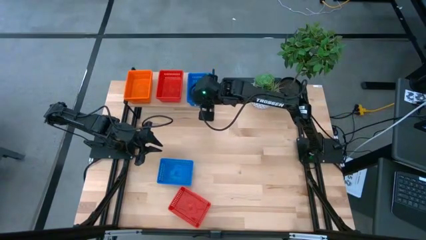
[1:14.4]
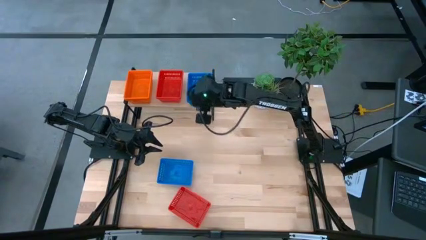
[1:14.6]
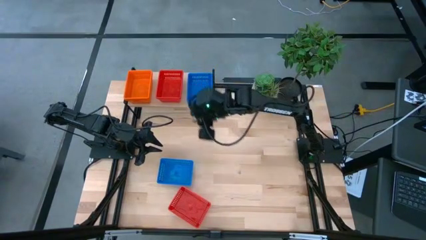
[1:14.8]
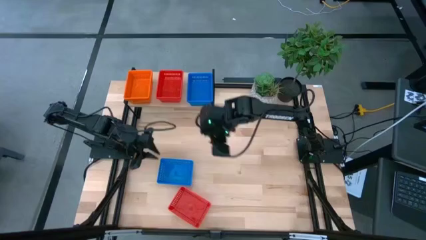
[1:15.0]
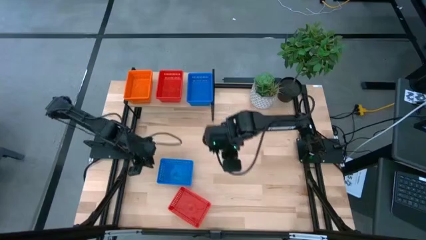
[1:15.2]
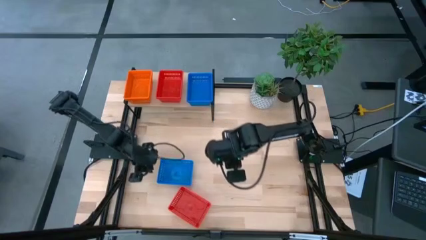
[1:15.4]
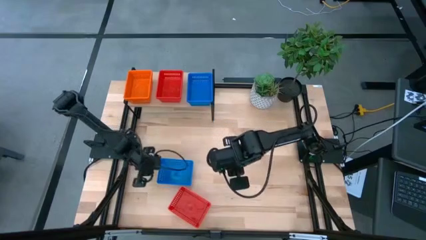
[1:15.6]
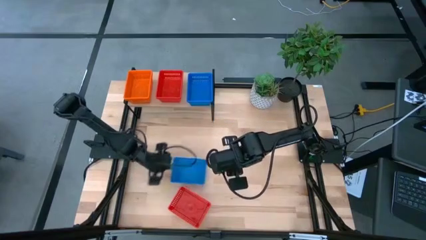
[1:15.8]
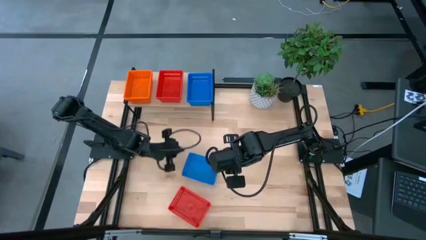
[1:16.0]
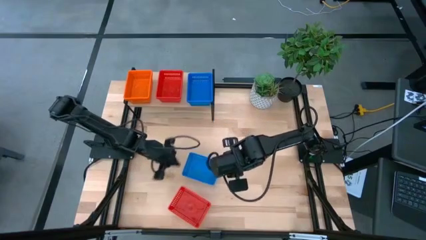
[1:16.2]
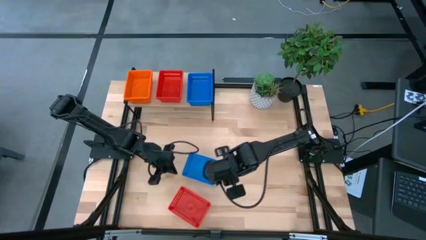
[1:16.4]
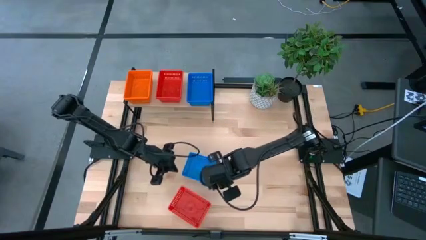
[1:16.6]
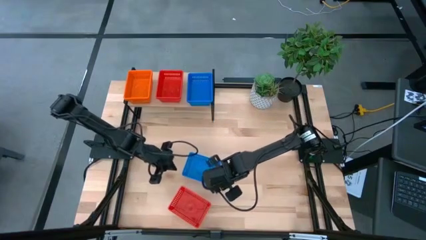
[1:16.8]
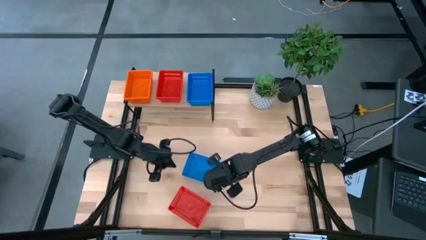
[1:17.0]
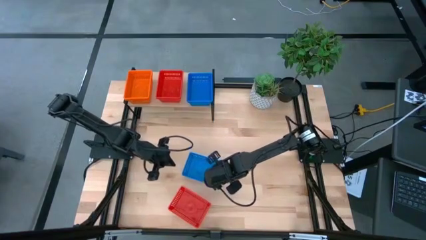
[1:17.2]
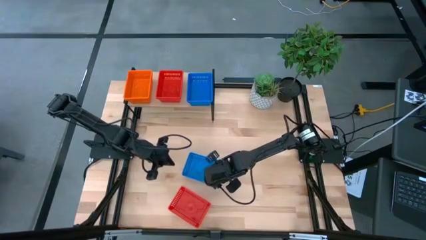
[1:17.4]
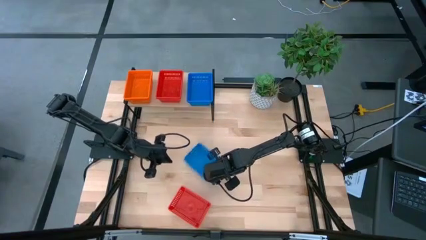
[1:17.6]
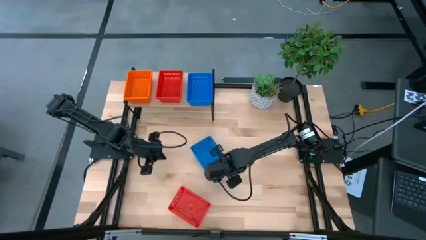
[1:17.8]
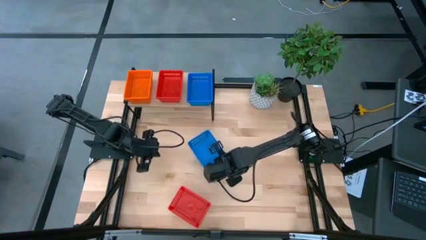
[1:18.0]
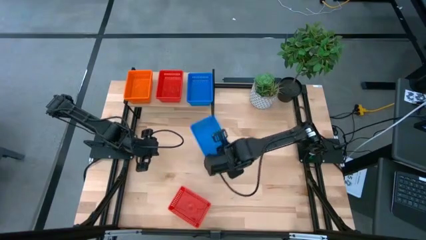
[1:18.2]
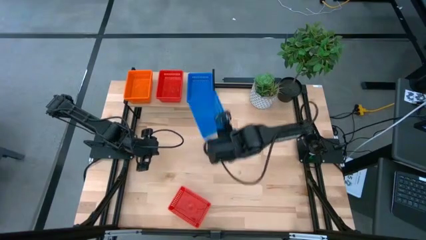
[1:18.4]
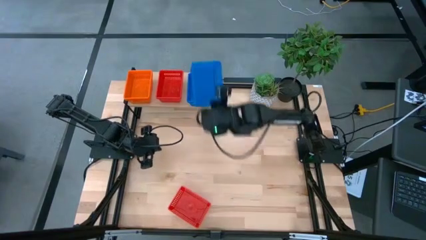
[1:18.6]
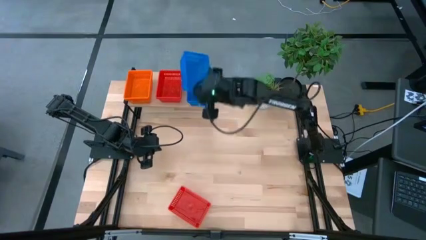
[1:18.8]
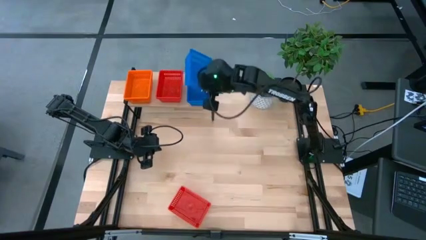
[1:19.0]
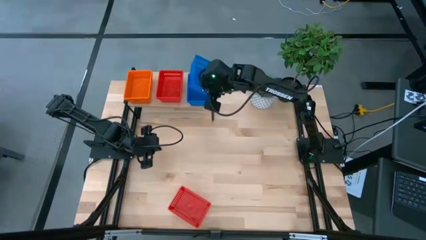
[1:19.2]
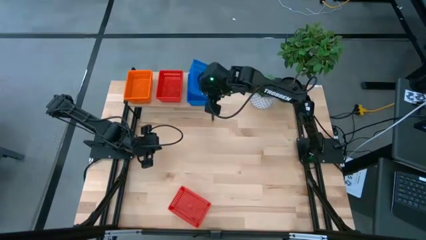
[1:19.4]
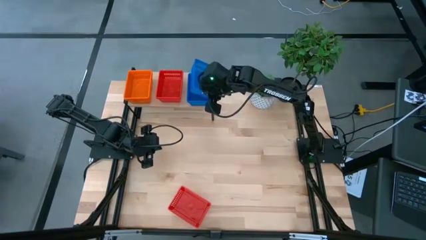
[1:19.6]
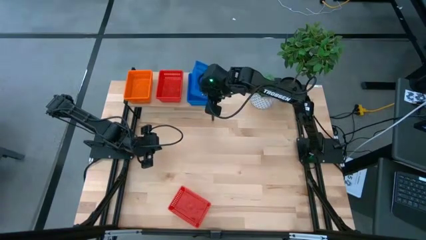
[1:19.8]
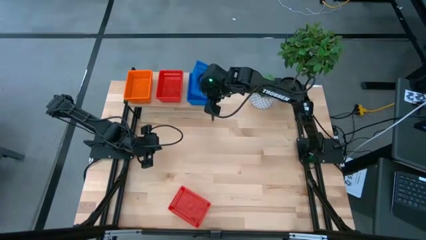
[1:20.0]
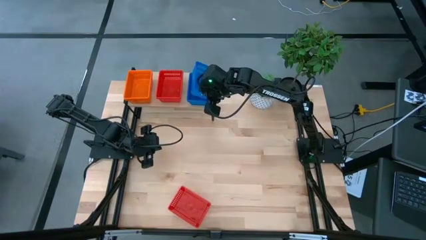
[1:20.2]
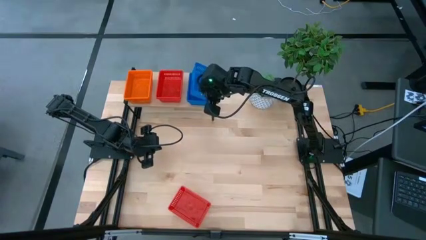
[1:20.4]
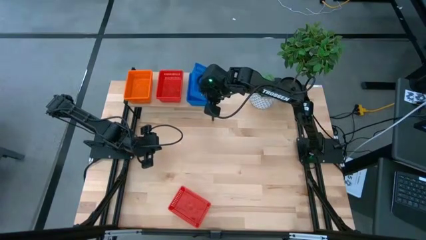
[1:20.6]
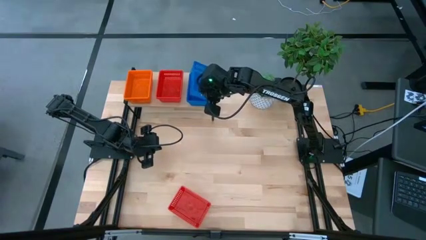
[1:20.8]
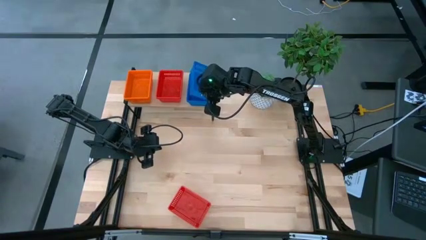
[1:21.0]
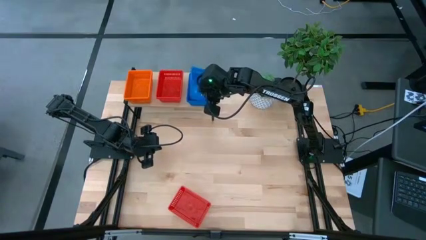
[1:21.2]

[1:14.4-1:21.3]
Task: Stack baskets on shelf by color
Stack the blue bin on top of the blue bin on the shelf

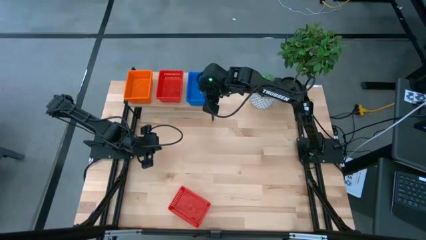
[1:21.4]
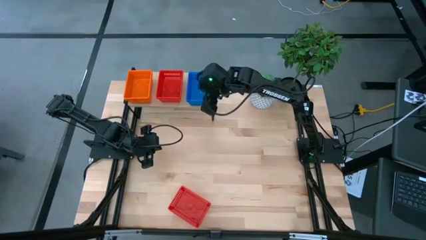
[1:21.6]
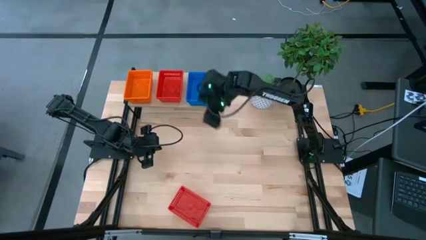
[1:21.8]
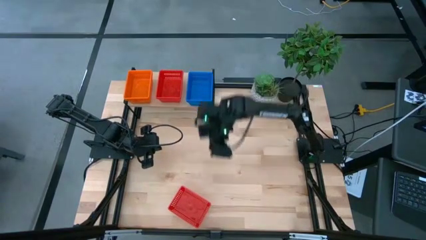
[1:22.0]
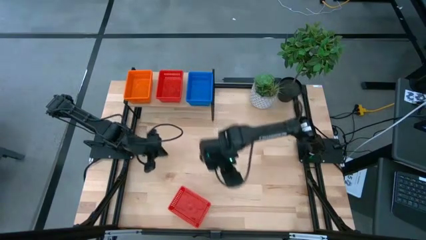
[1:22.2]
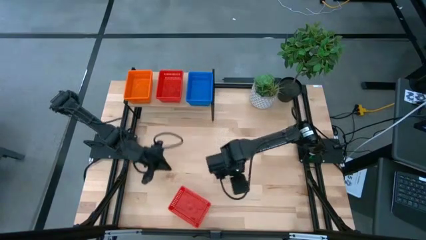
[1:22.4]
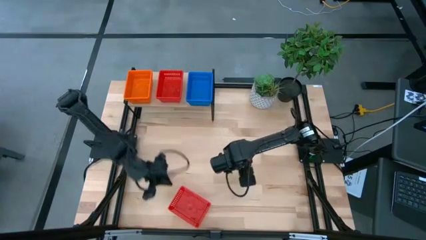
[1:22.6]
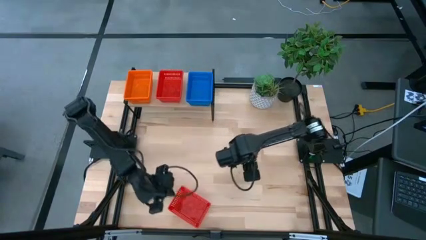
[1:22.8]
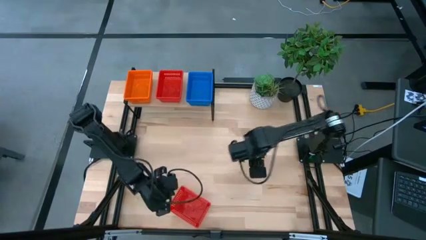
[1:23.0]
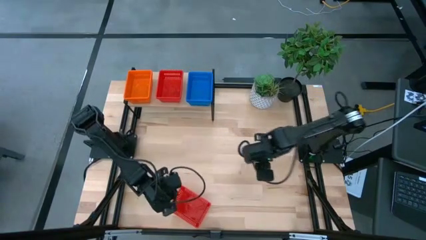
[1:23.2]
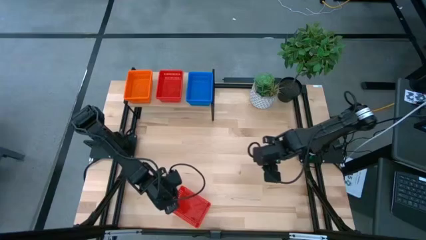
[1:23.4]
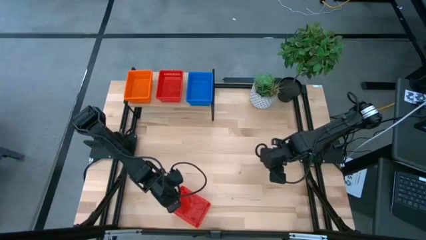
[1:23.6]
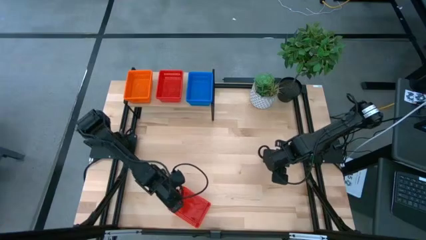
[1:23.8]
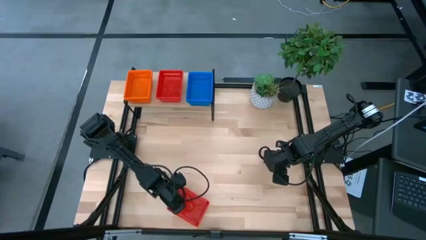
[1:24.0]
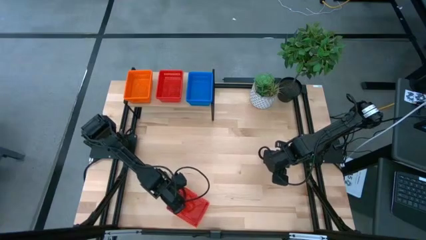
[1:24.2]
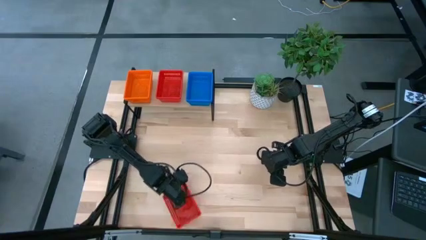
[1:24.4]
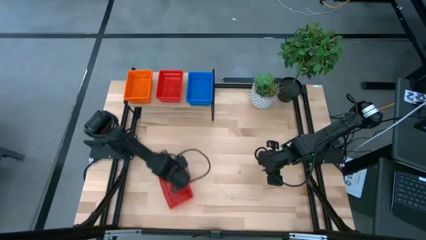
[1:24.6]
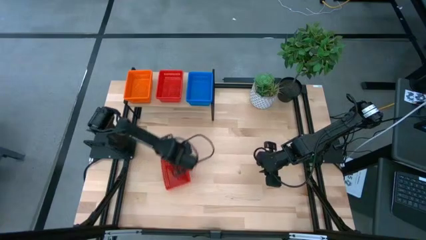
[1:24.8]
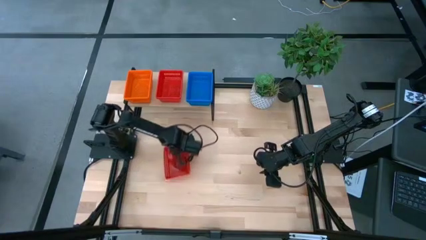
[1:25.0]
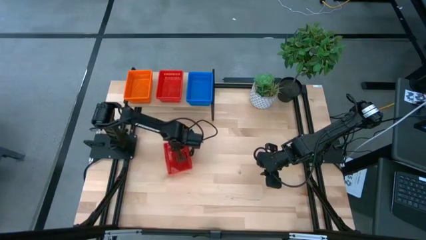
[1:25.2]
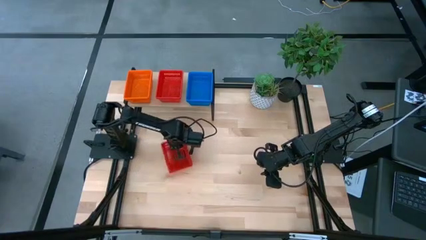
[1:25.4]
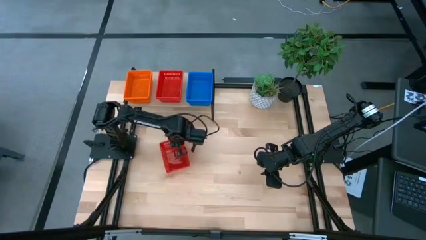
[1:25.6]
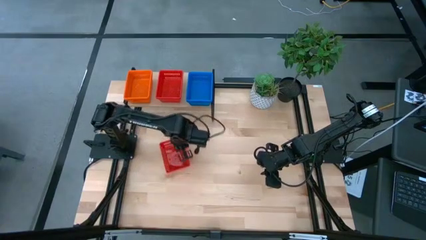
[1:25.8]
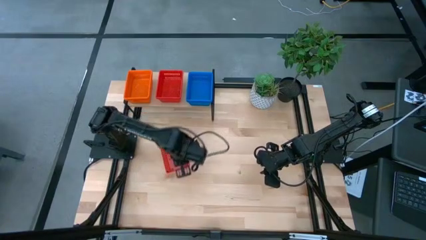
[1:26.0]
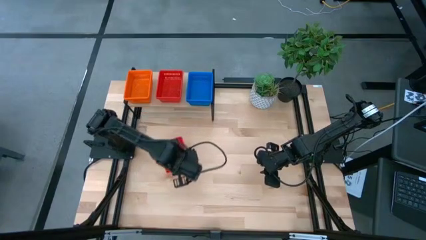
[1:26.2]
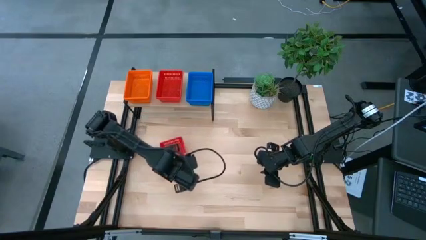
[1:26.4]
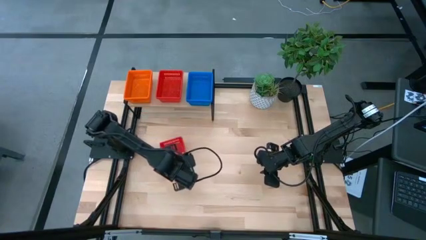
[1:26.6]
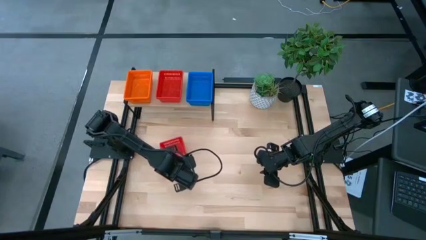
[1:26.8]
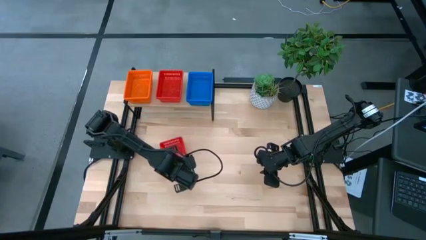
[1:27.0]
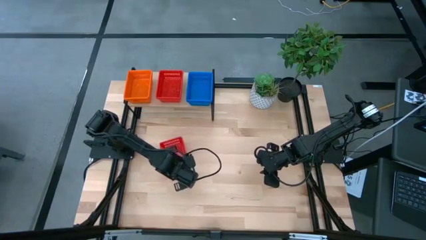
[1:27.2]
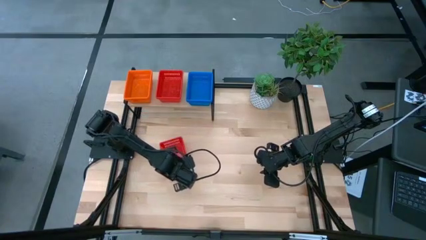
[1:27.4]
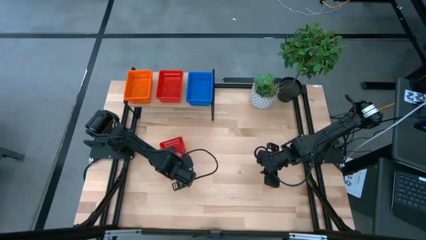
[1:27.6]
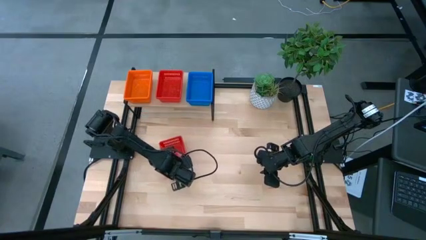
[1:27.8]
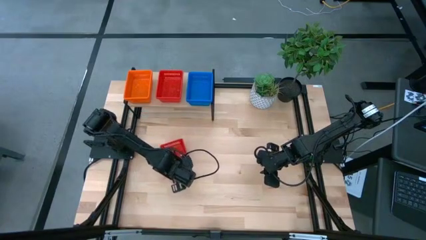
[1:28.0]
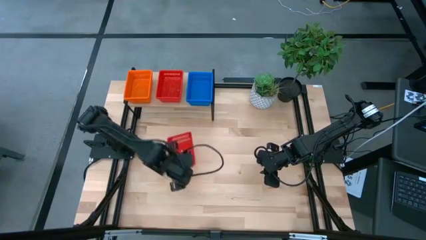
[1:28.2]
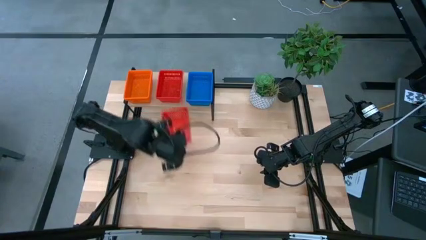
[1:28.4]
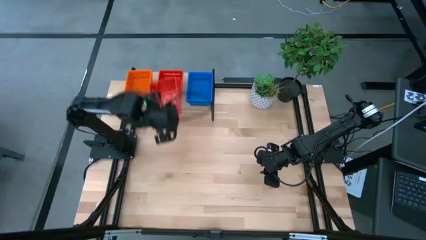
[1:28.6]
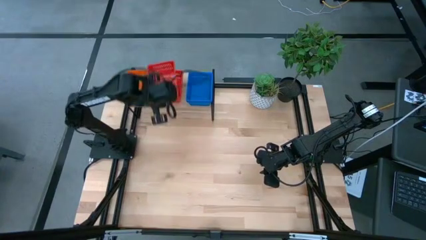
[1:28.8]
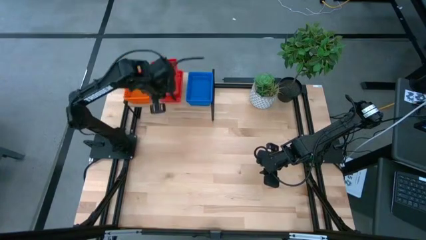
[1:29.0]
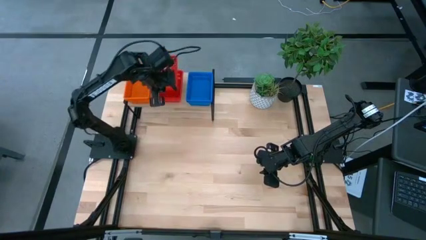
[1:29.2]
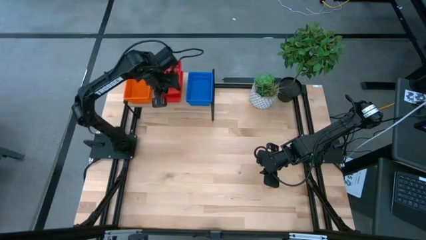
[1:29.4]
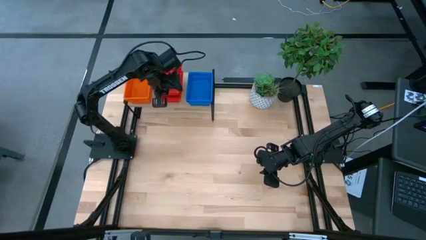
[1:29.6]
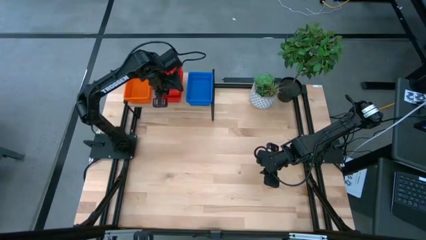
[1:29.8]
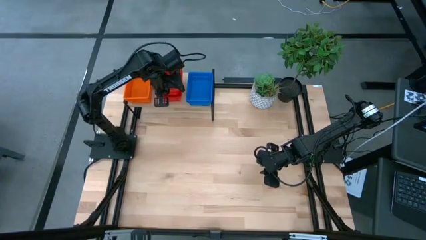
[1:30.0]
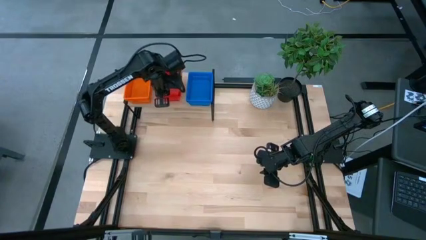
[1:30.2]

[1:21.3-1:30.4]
Stack the red bin on top of the red bin on the shelf
